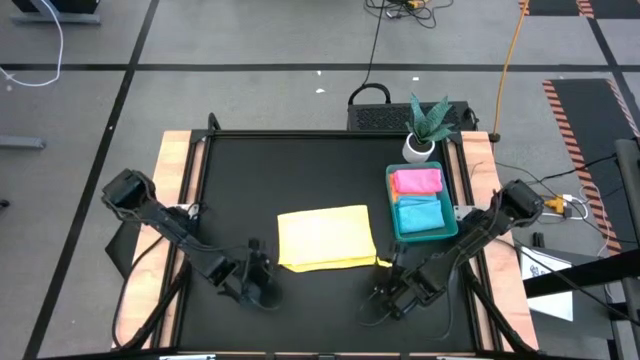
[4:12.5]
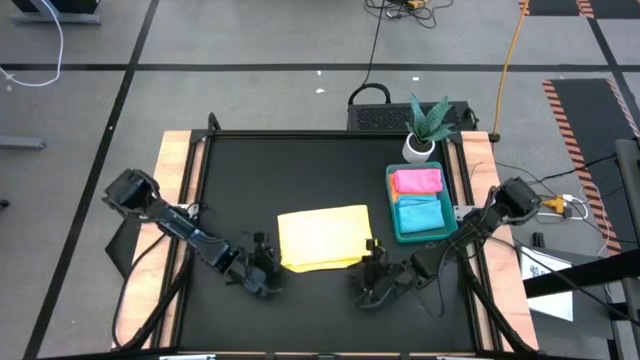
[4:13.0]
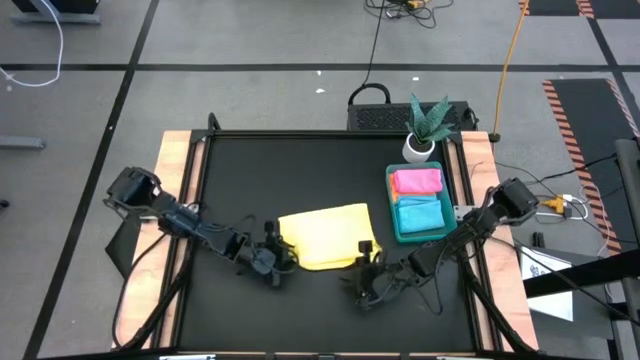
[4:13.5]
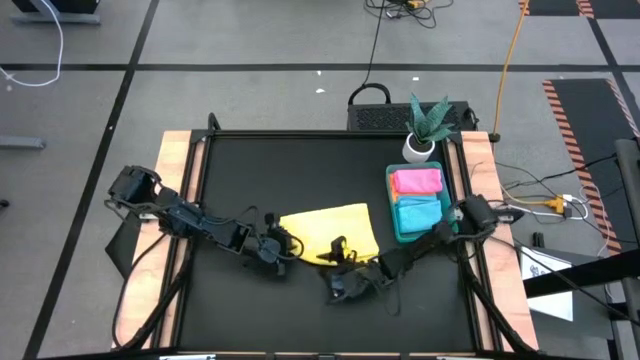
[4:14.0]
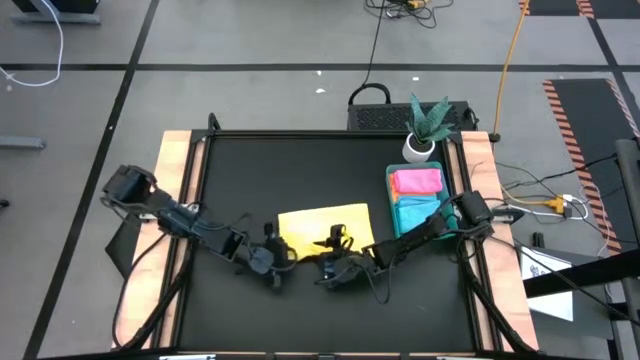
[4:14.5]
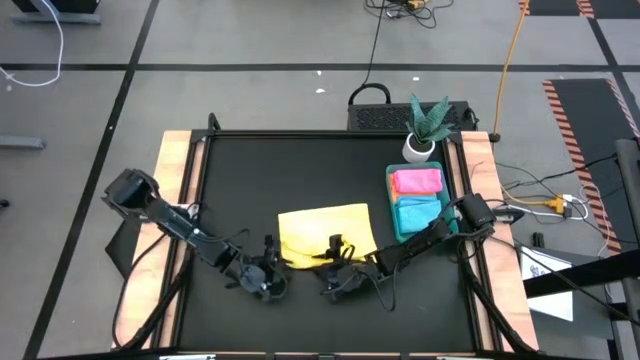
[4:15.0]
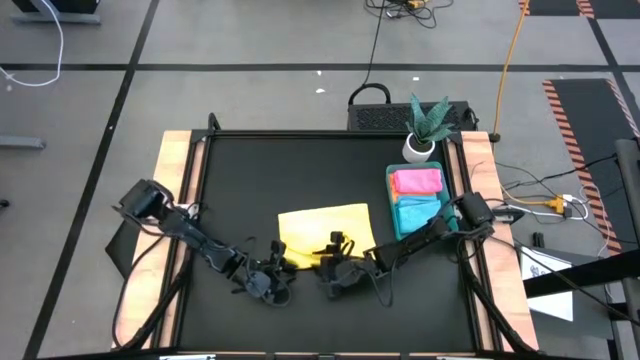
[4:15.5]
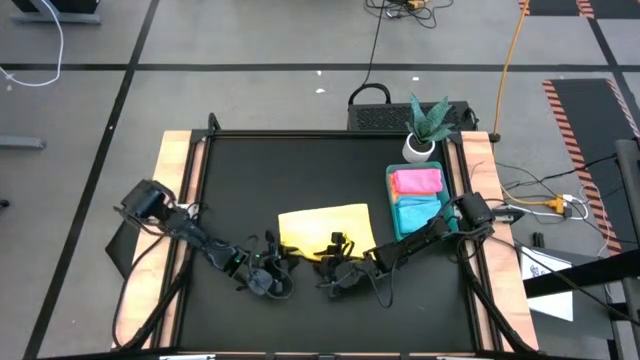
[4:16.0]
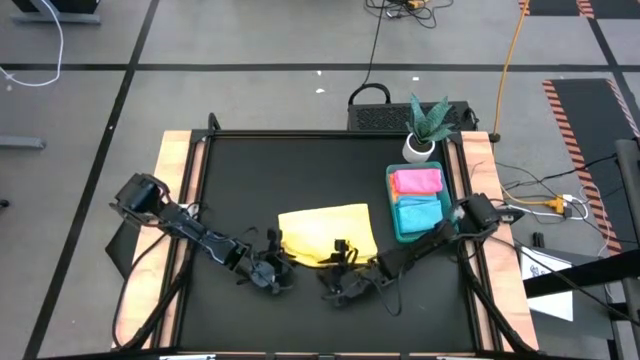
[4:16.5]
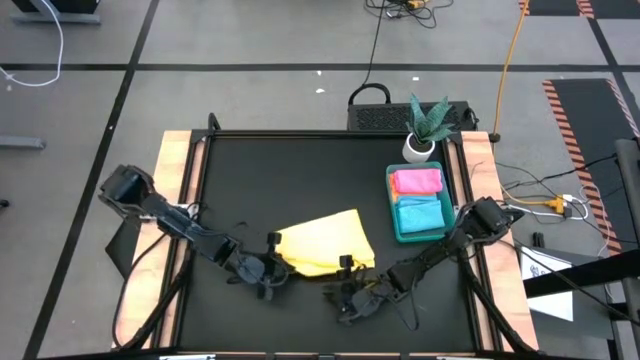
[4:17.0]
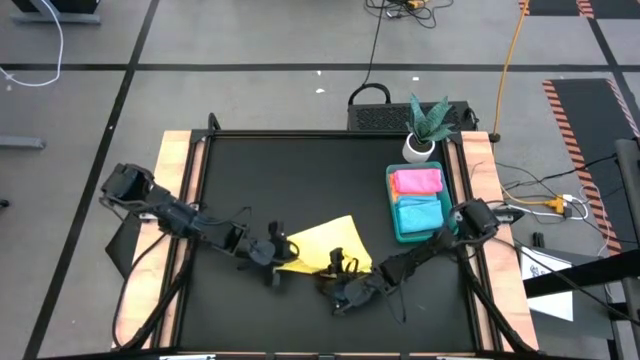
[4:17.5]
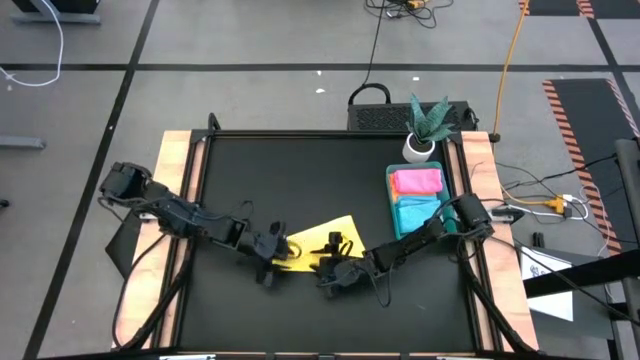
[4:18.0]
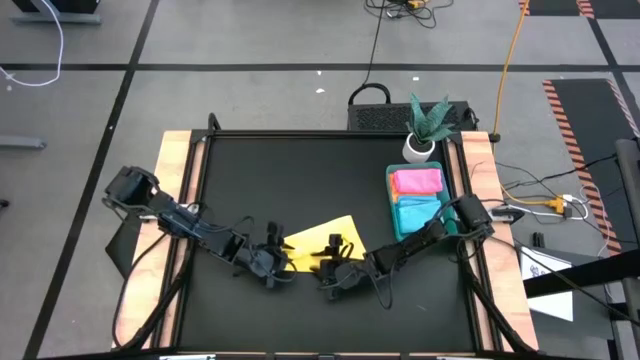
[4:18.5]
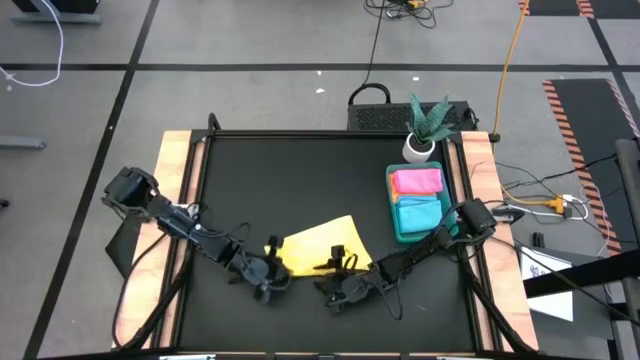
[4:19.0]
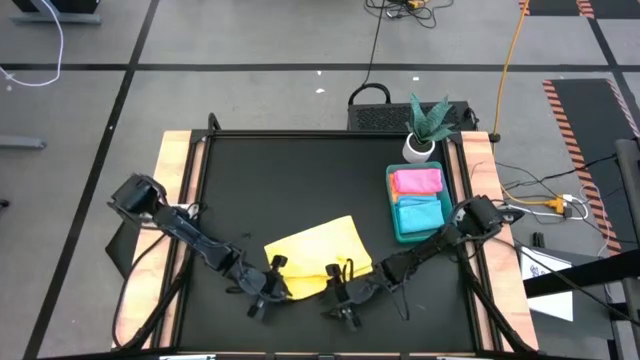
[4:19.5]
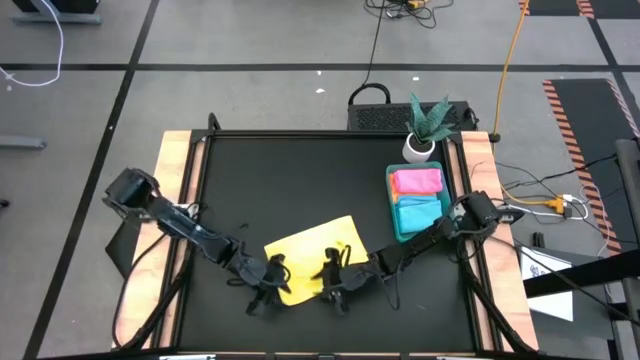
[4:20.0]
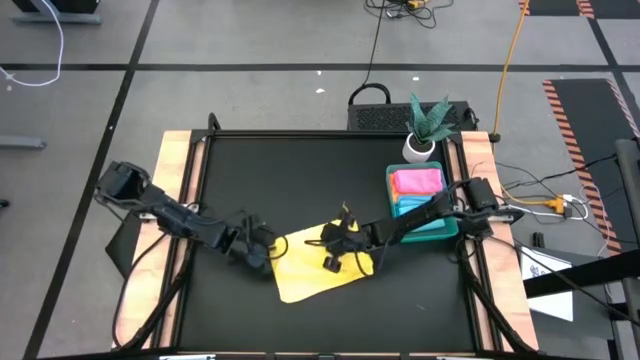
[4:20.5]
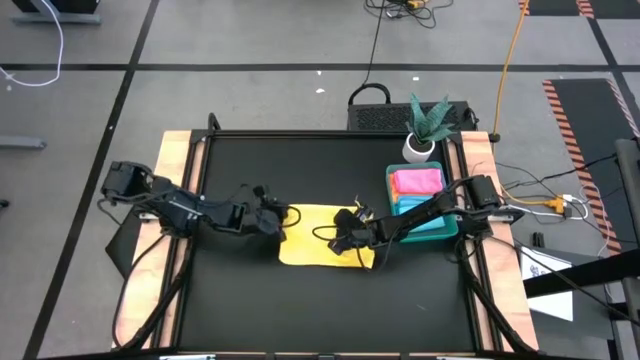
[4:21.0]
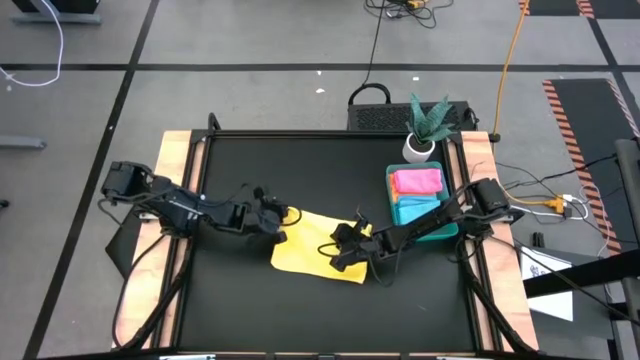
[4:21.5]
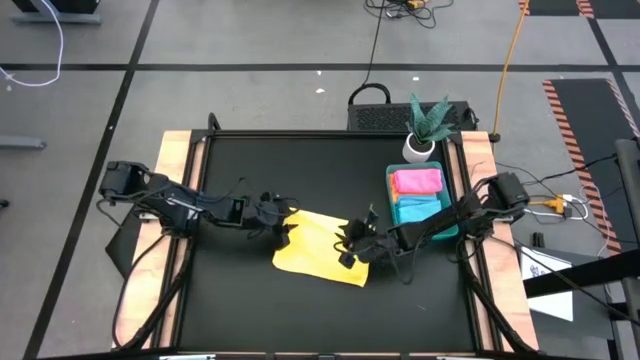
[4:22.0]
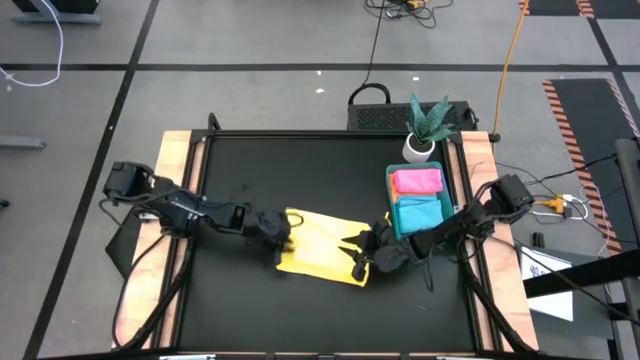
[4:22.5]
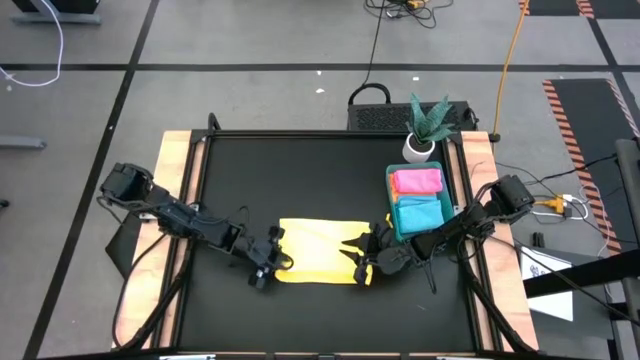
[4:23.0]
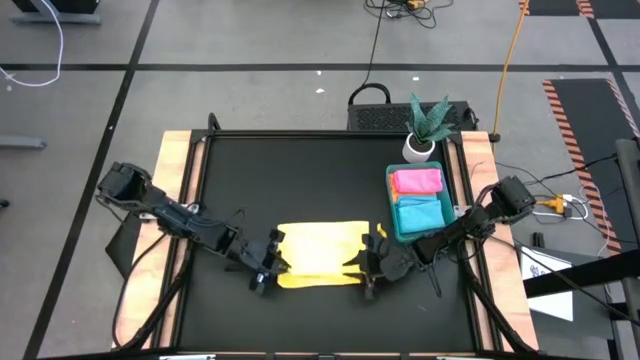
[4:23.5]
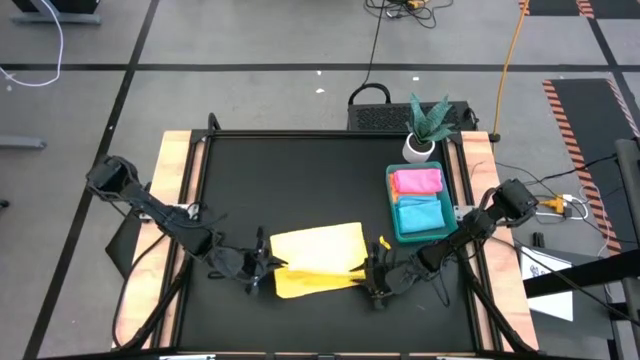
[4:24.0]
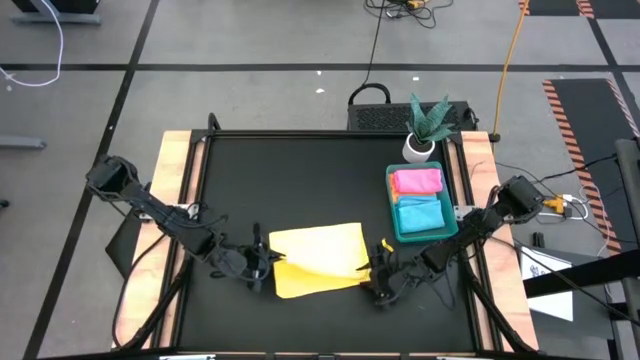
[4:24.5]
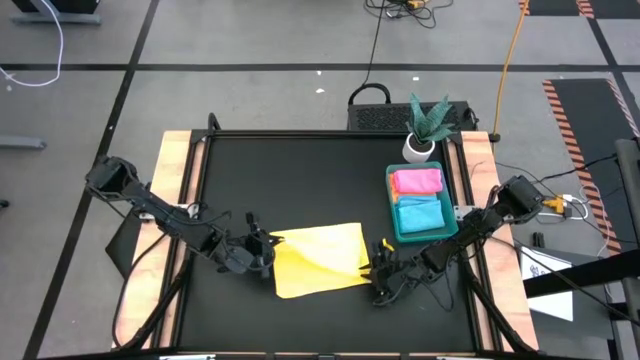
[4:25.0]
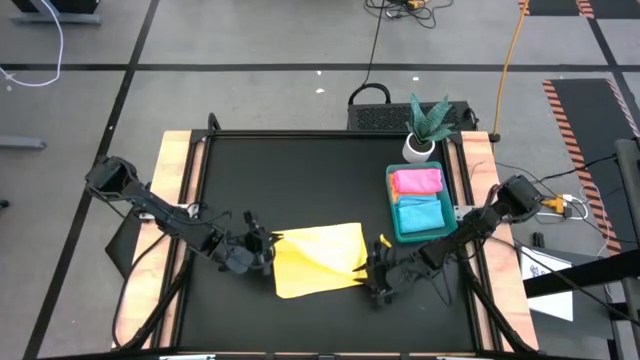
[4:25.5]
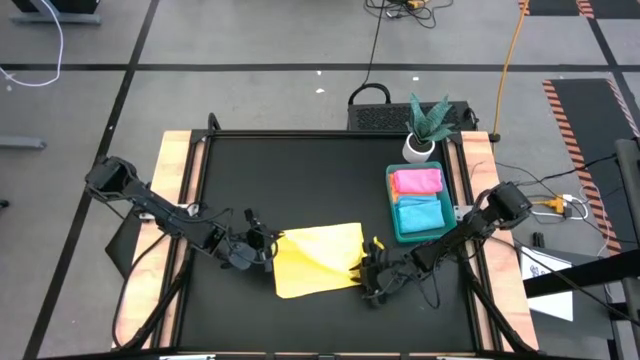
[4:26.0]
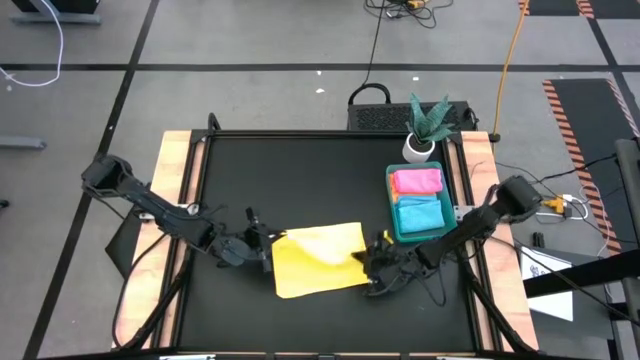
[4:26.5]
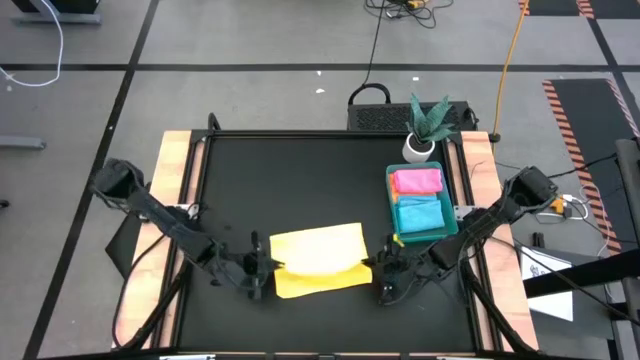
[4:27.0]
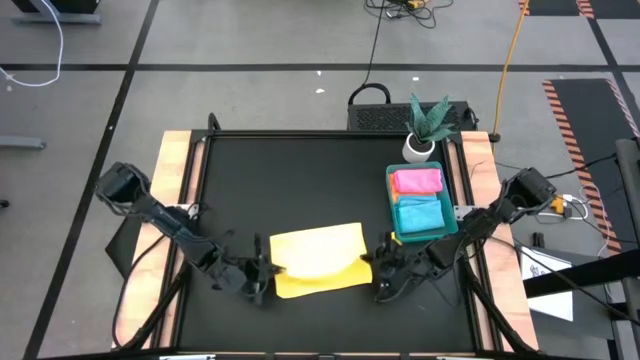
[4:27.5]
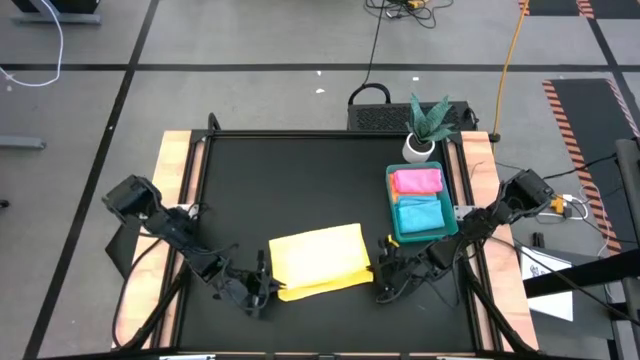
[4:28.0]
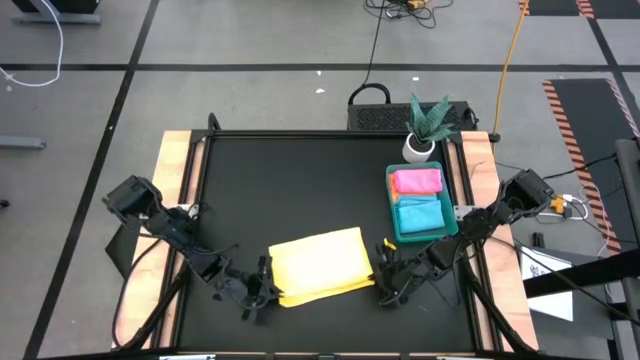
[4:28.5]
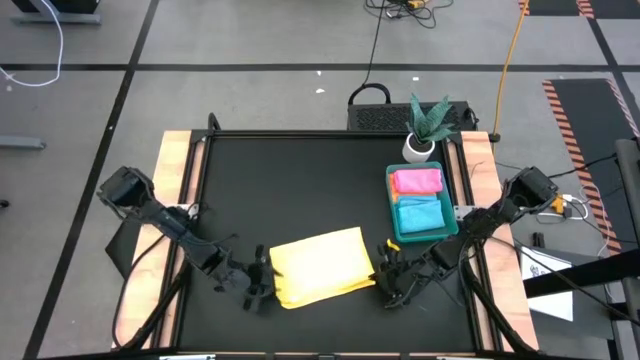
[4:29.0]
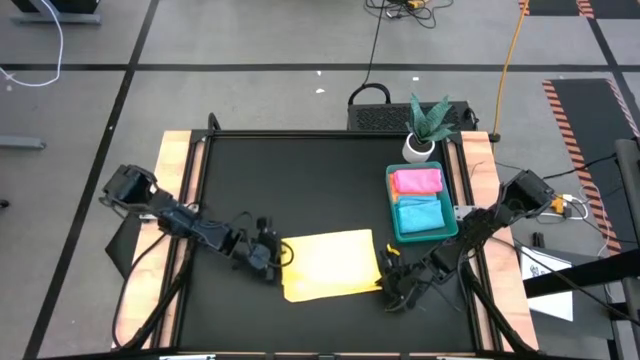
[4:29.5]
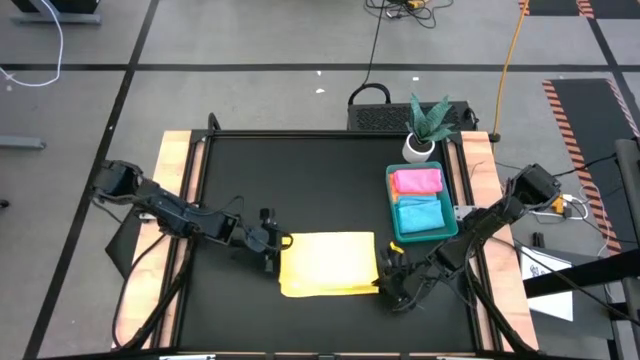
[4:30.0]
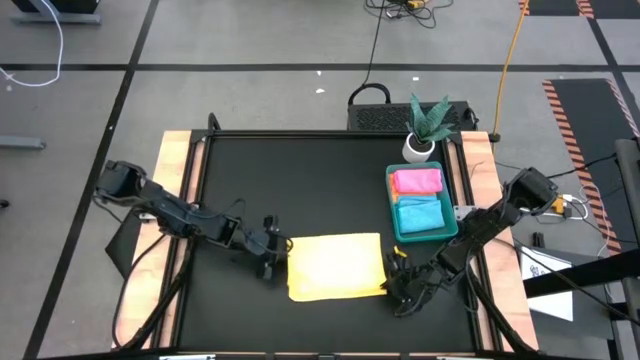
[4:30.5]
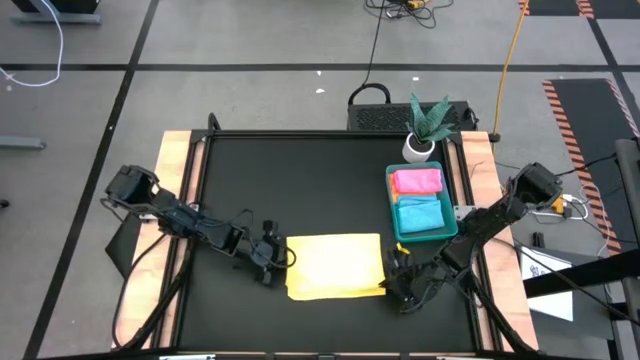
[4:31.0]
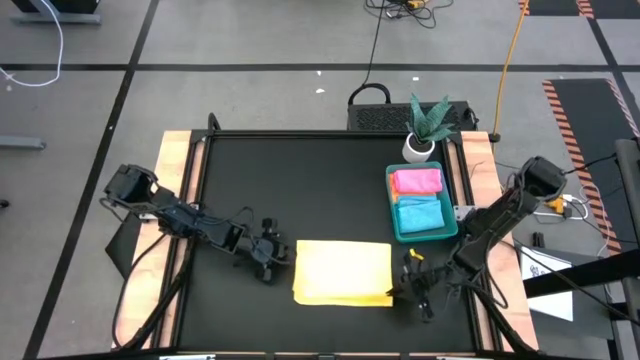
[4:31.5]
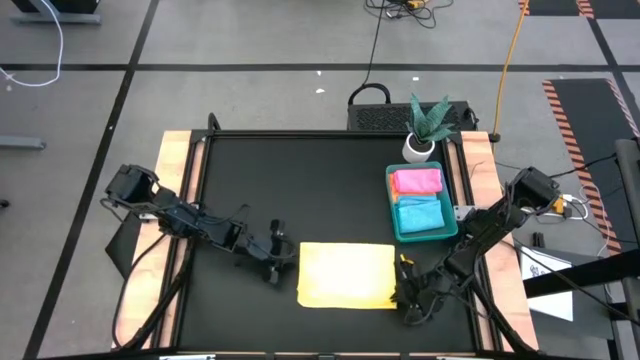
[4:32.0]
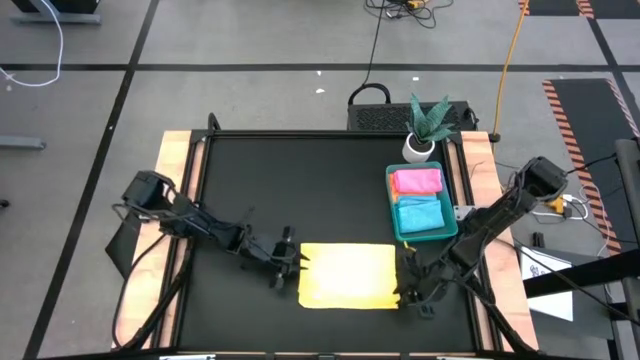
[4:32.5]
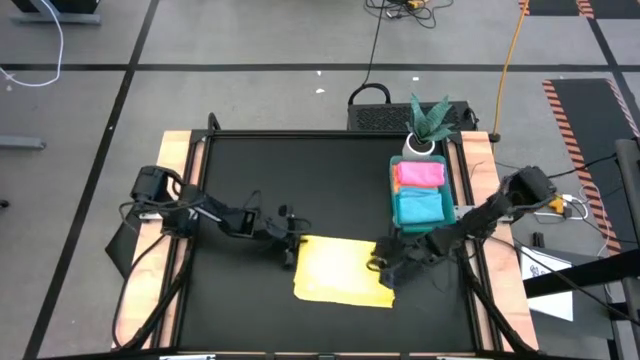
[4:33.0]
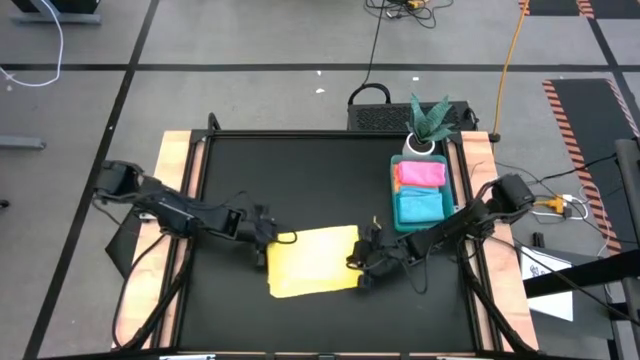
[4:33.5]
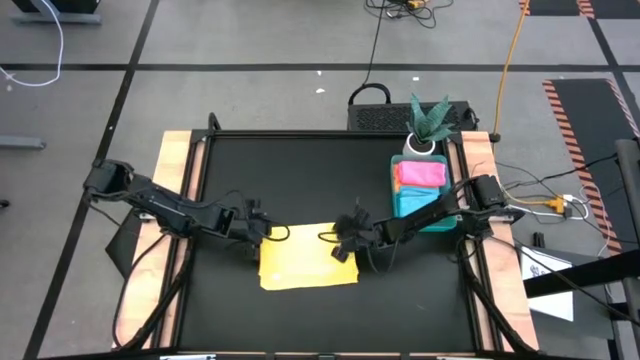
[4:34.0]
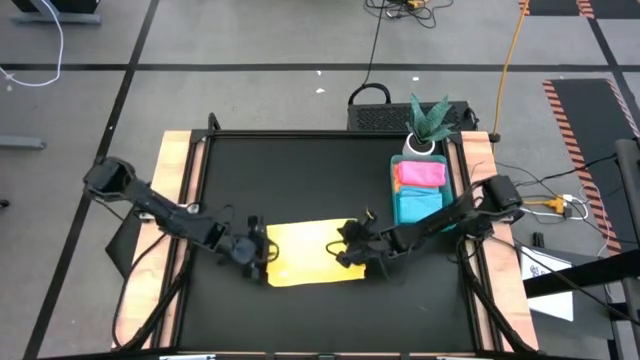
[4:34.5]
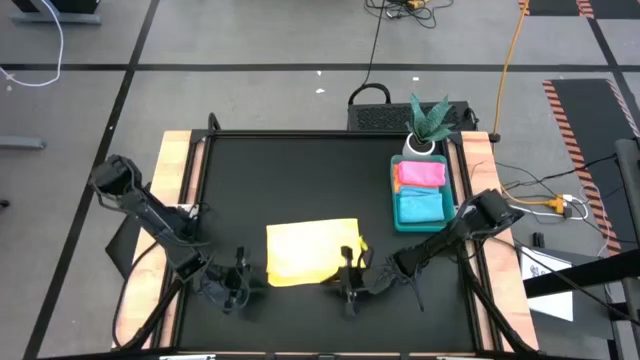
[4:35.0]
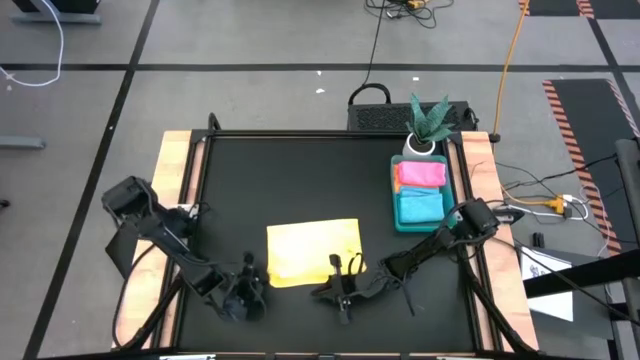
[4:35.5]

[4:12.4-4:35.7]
Task: Fold microfiber towels
Fold the yellow microfiber cloth
